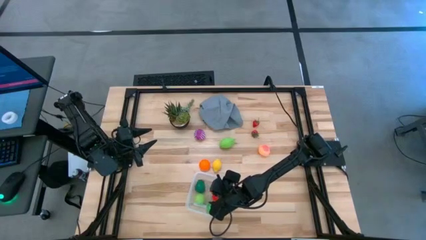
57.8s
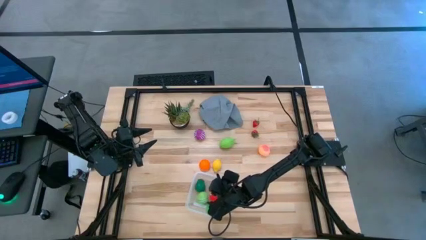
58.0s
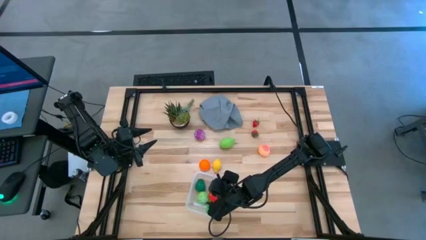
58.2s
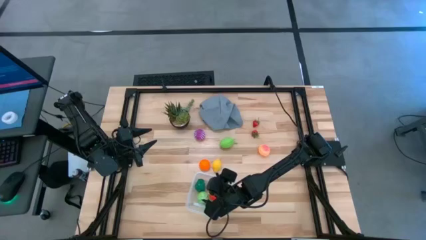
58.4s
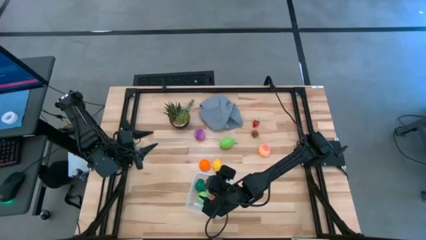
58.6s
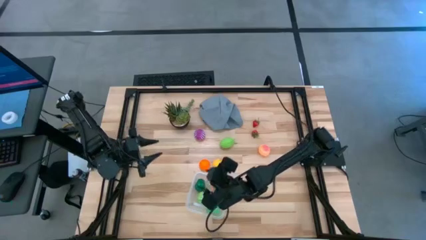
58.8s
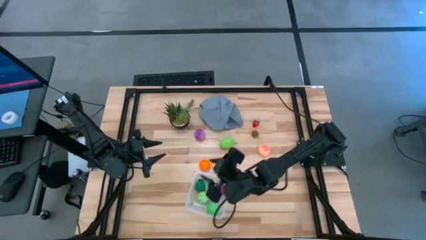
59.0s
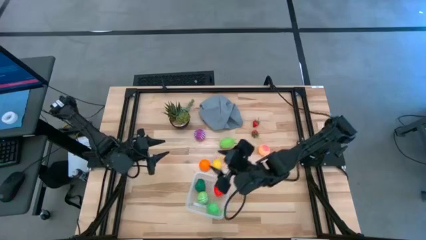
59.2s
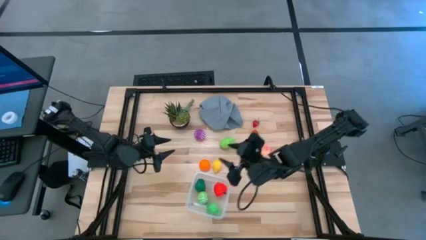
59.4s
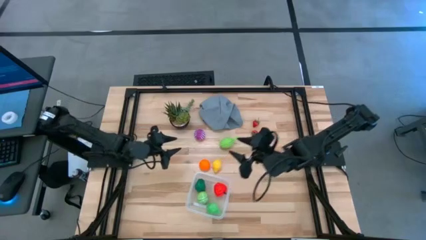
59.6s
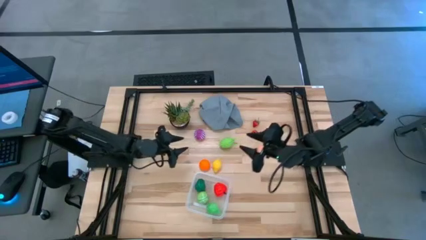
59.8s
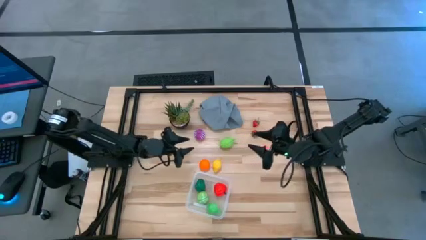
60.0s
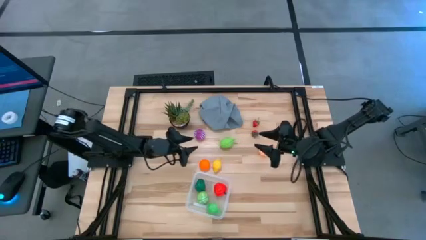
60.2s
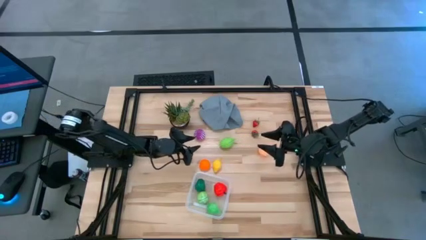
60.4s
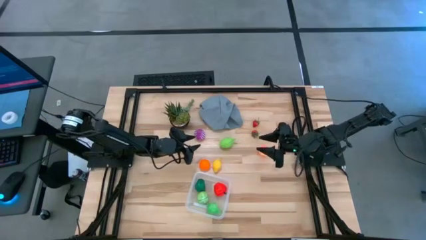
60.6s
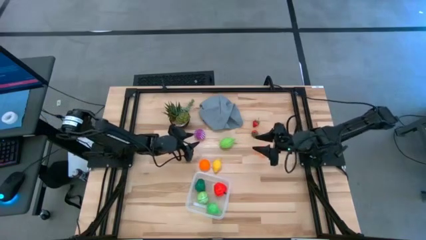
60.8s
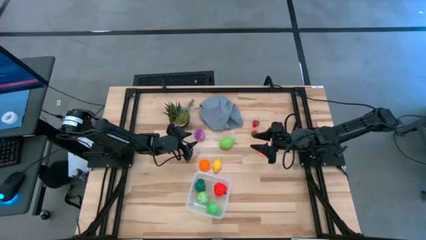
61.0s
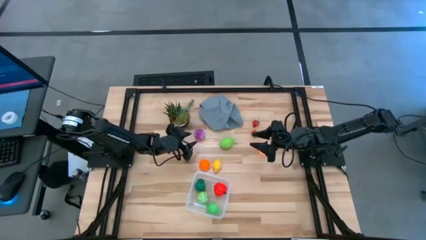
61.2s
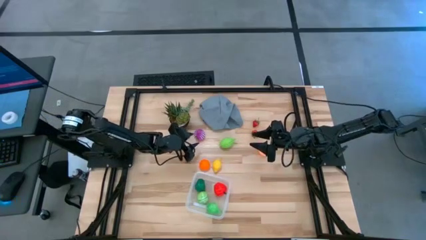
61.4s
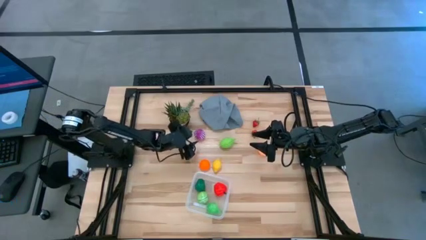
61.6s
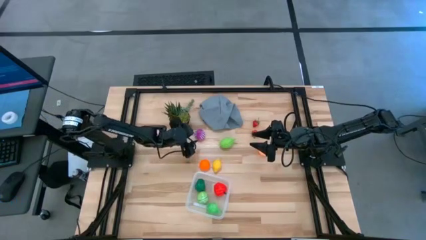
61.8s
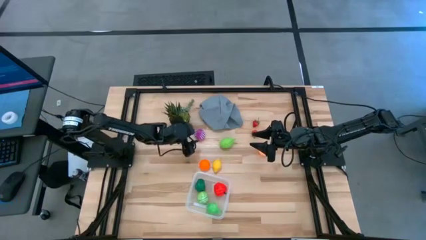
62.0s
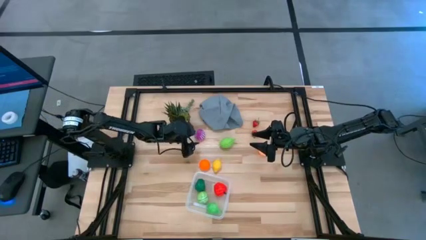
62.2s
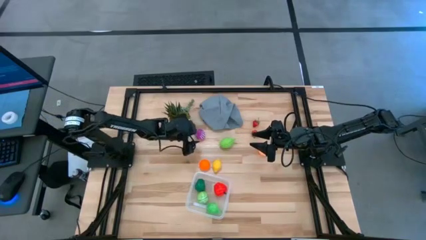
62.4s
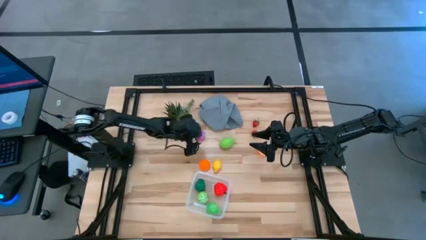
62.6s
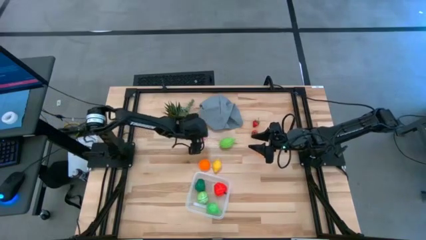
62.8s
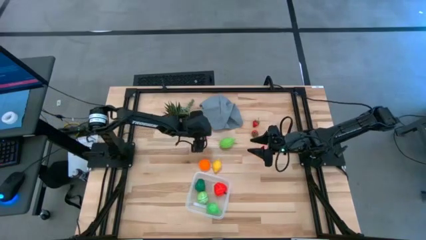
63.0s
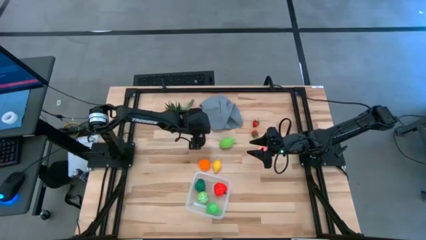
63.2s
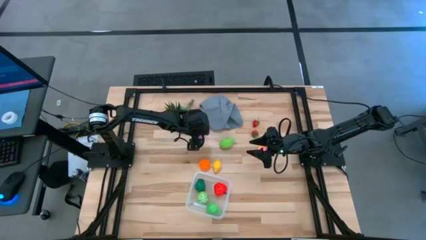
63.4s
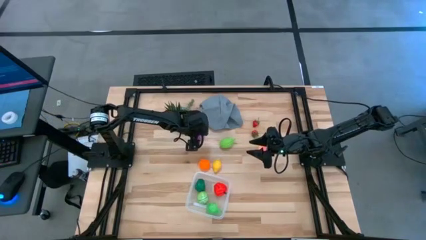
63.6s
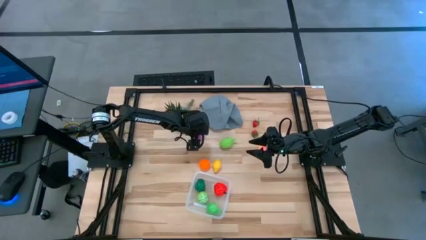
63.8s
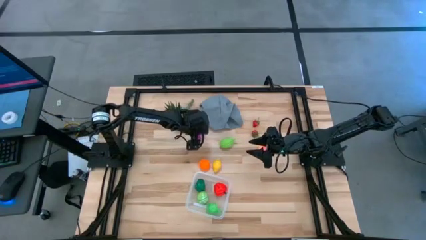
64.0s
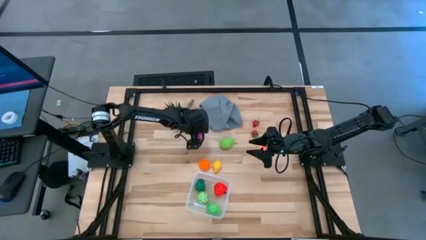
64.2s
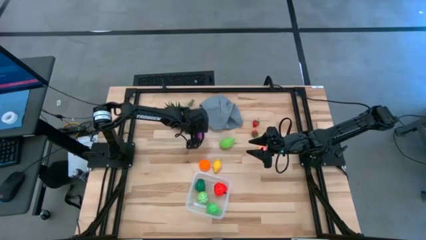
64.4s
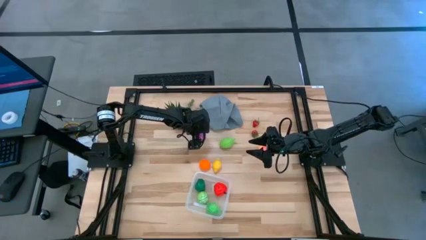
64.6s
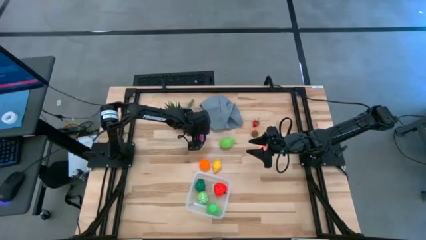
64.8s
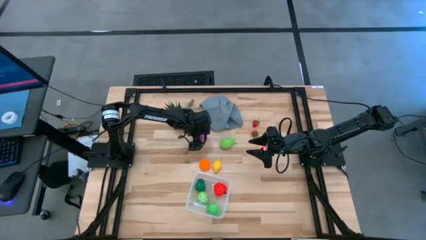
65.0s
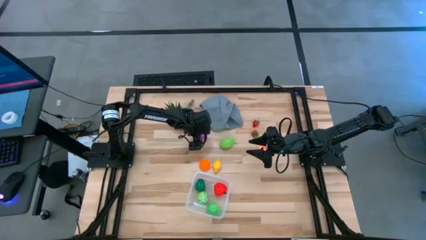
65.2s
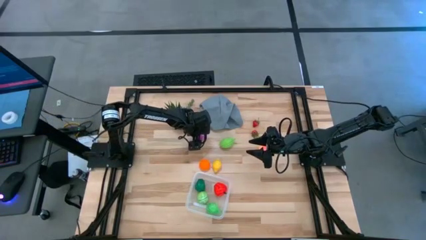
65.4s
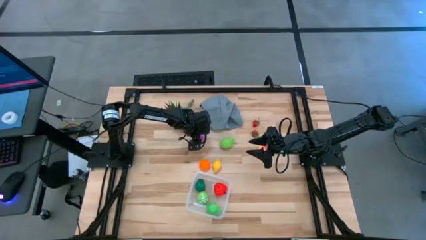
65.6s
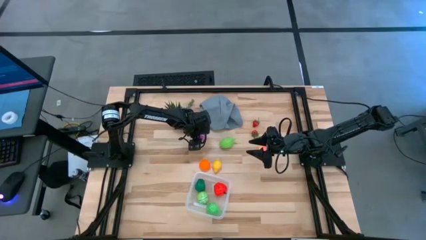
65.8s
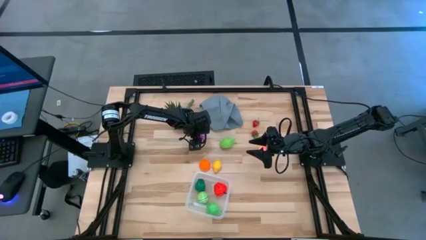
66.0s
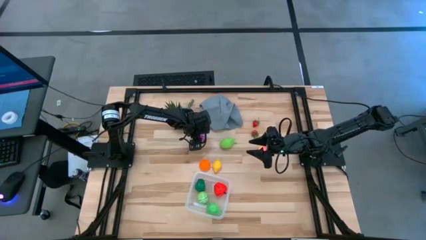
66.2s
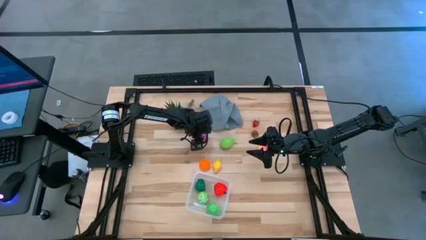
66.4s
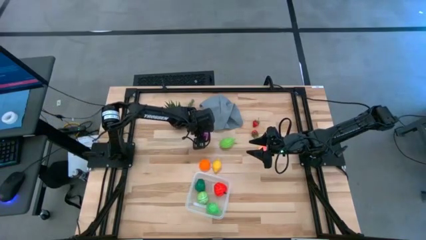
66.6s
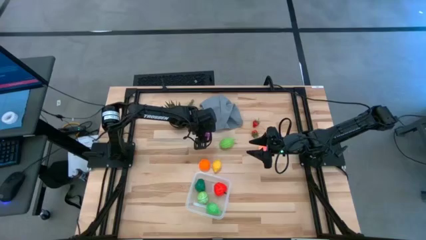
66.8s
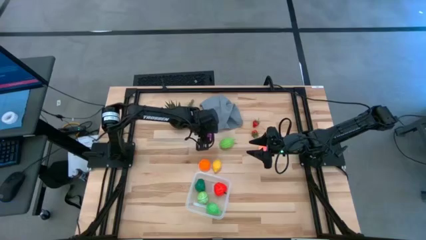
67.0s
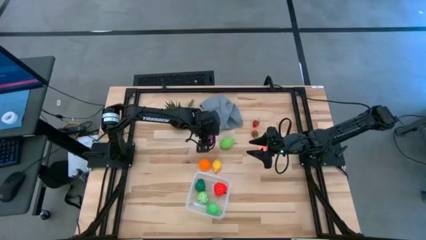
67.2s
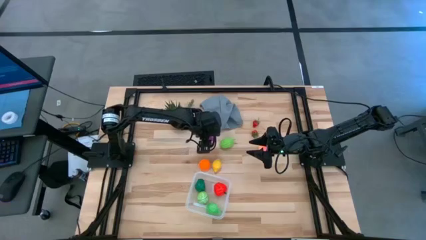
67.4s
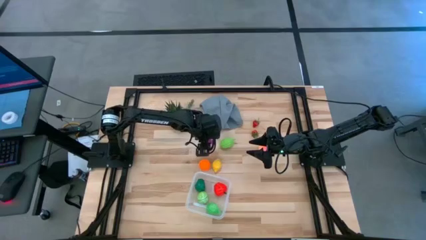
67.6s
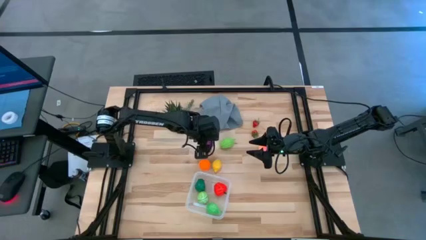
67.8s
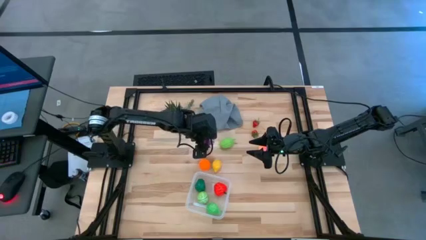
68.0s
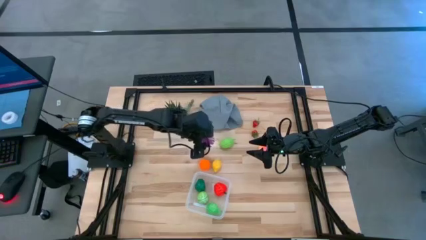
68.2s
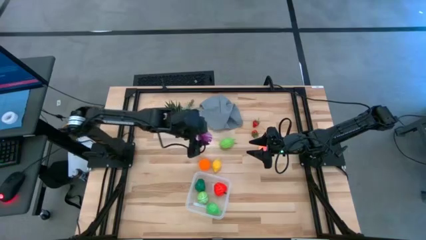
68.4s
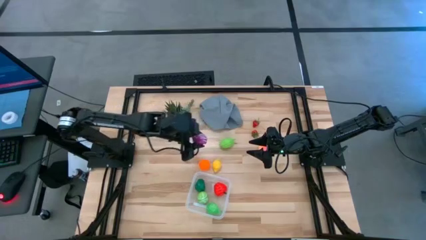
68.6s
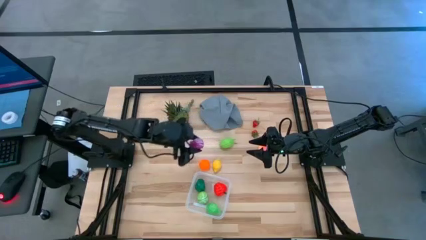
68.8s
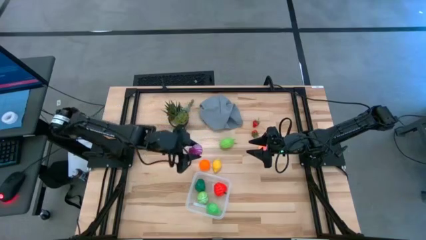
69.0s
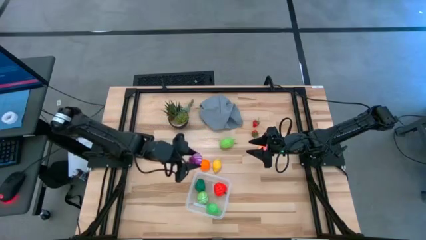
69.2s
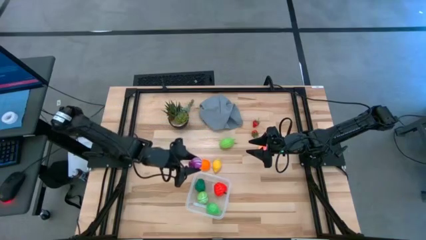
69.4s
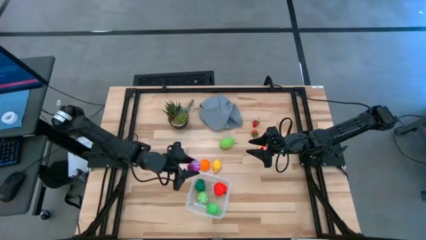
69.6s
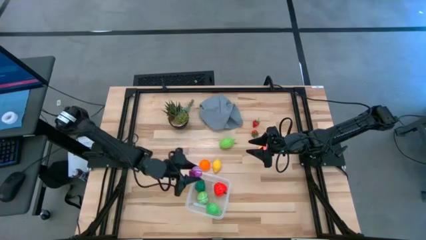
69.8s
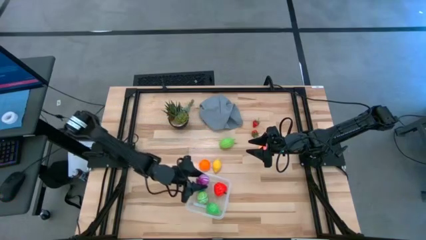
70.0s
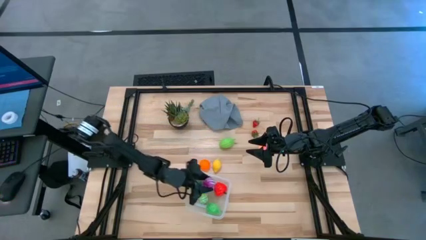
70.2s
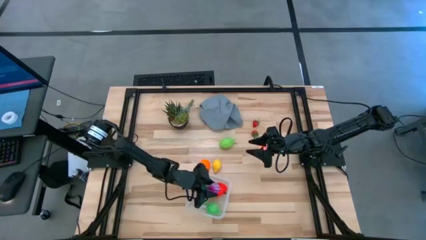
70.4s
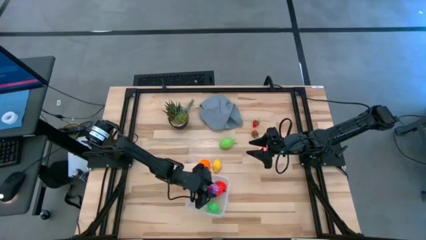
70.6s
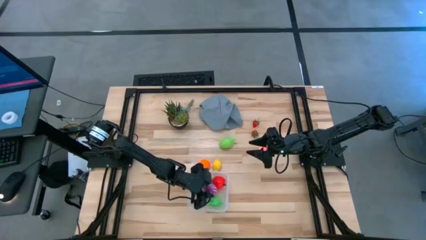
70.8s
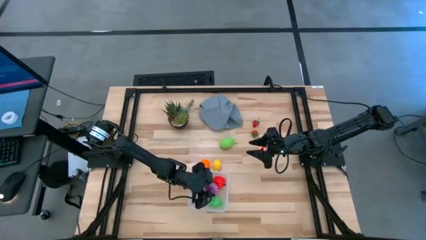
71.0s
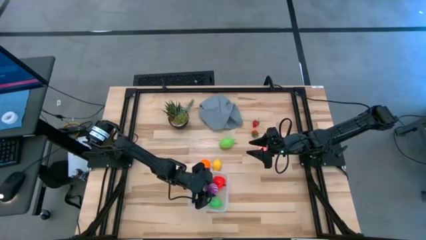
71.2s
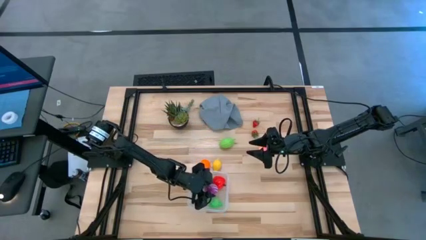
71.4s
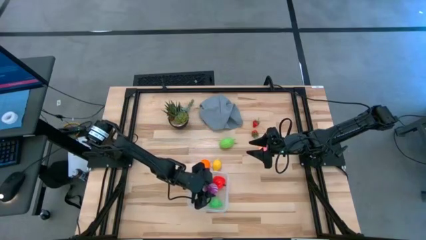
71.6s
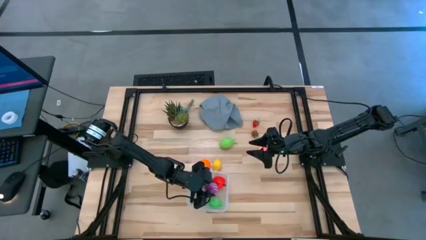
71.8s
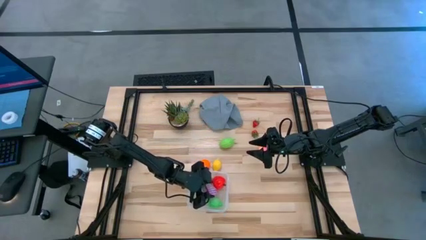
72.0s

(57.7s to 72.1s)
Task: Pick and placing Produce into tupperware
Put the onion into the transparent bin
